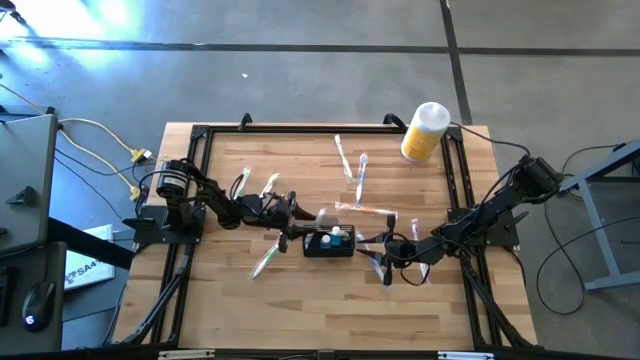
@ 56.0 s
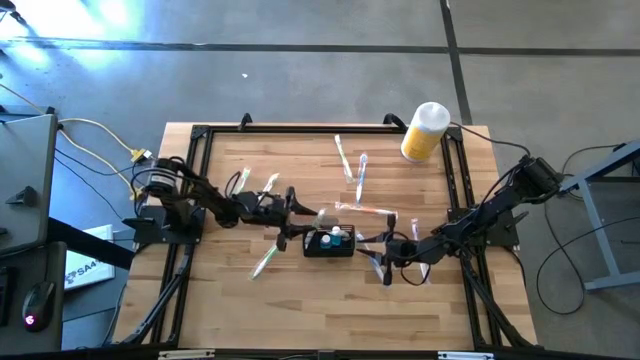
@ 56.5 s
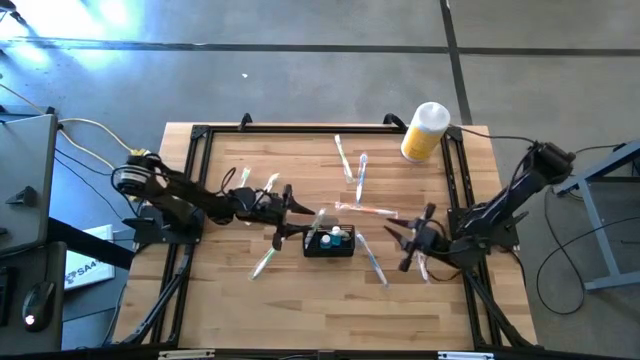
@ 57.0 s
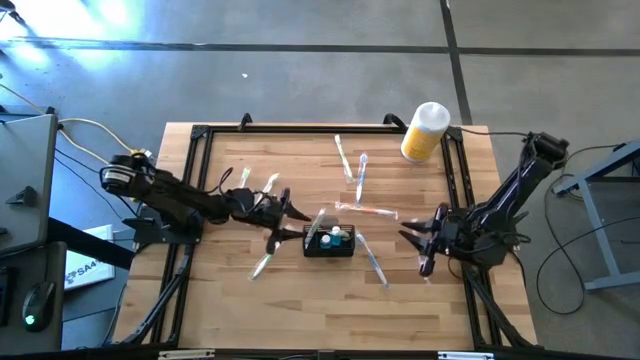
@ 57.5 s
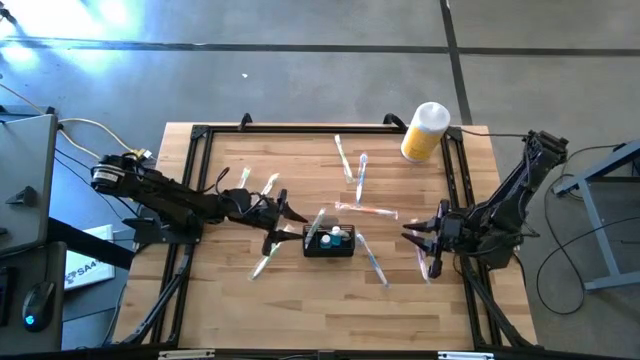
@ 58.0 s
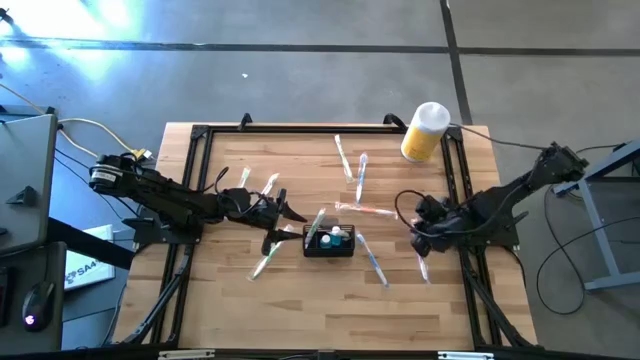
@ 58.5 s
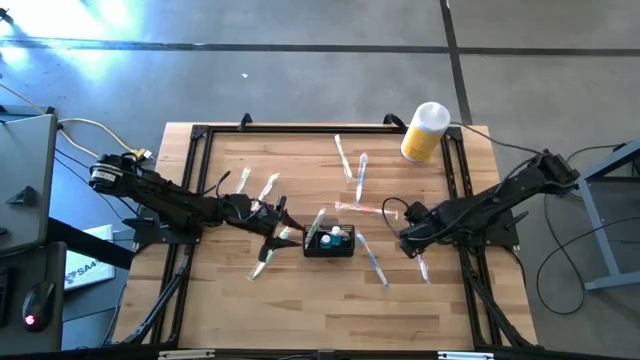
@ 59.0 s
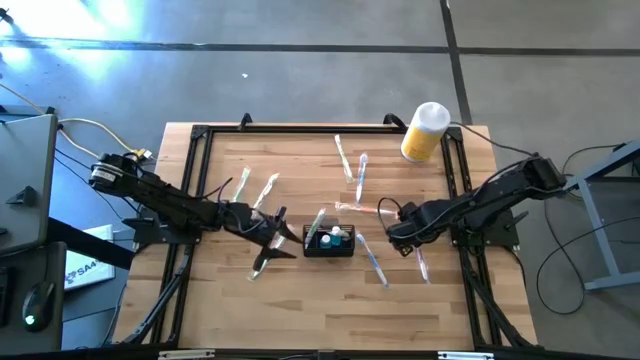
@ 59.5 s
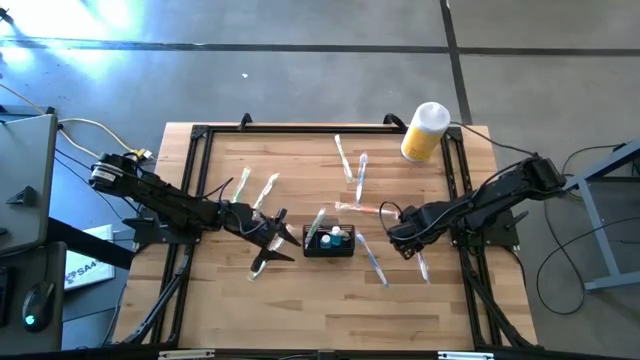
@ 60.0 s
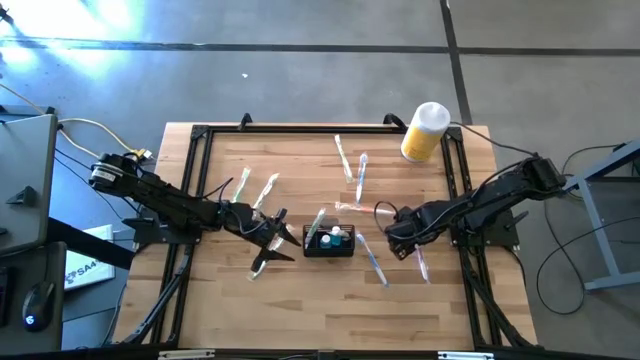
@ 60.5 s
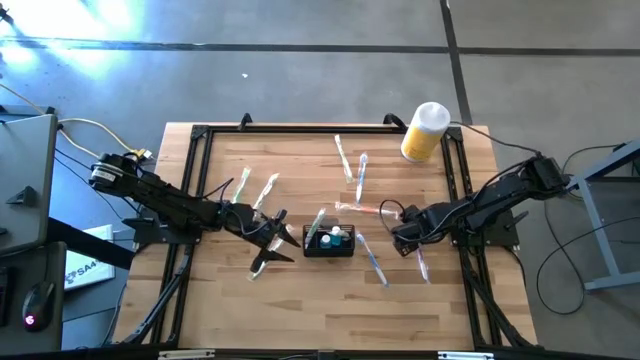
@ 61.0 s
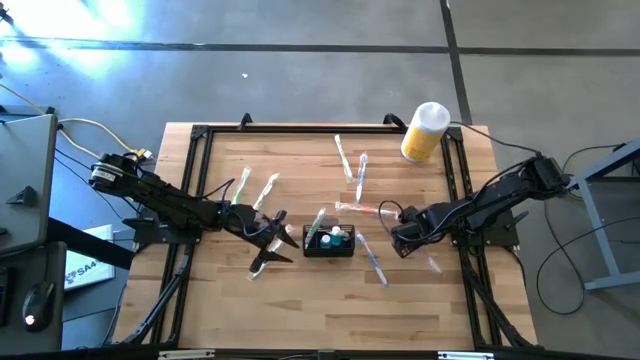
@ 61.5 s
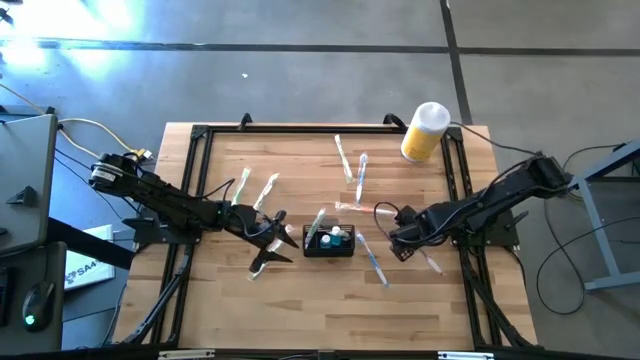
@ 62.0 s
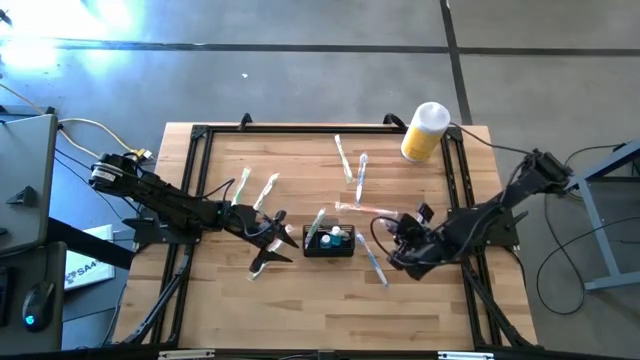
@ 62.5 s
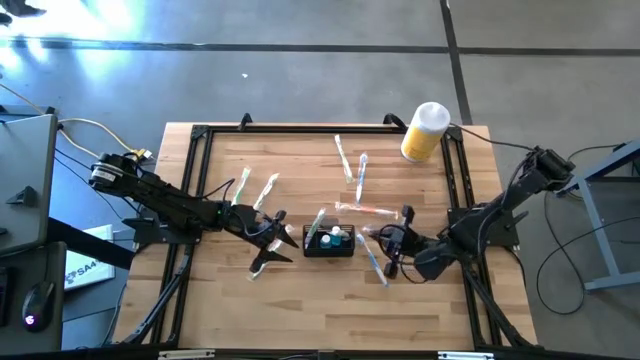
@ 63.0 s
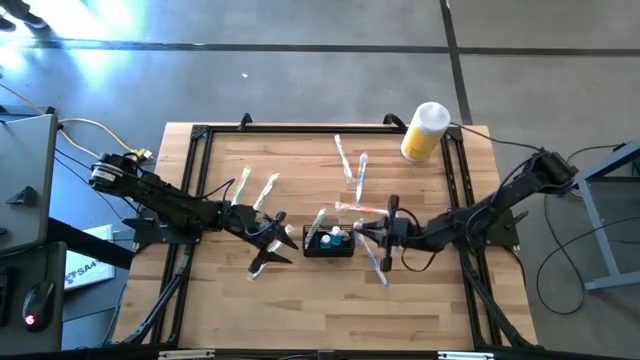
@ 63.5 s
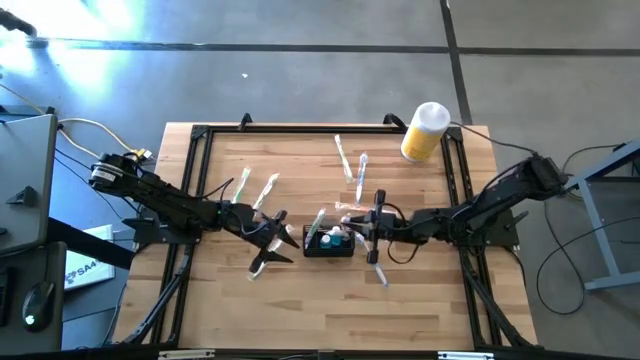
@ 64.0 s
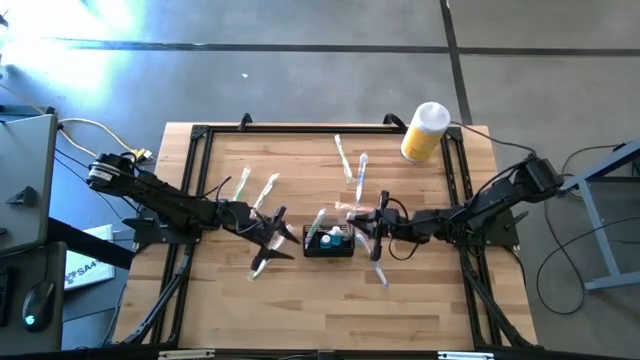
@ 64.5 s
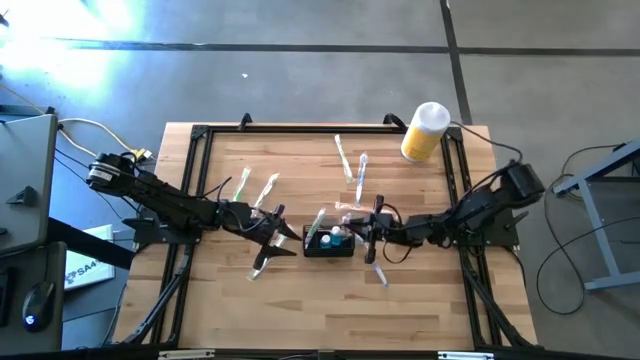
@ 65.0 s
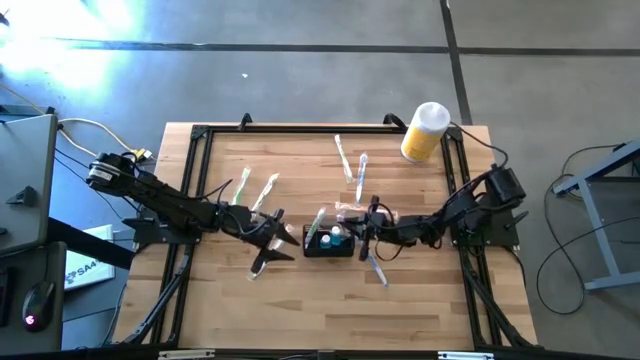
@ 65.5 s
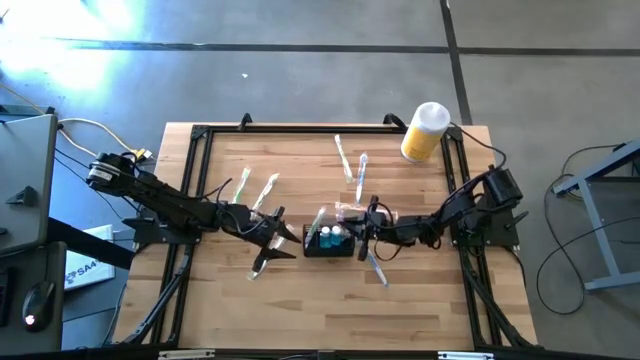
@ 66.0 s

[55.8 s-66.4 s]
Task: Pick & Place toothbrushing station
Put the purple toothbrush into the wire organizer

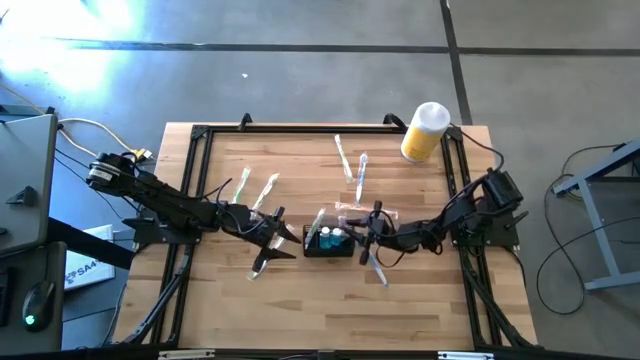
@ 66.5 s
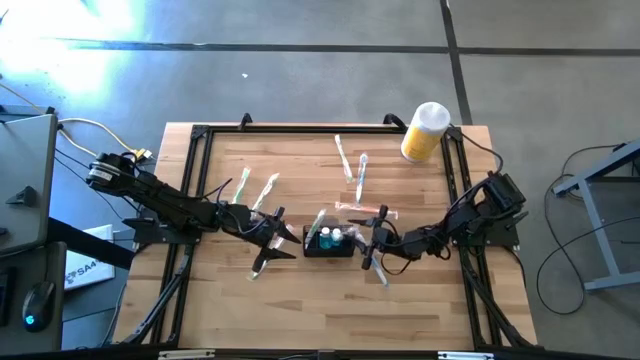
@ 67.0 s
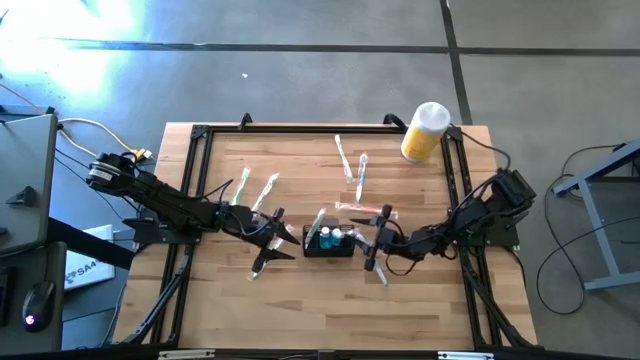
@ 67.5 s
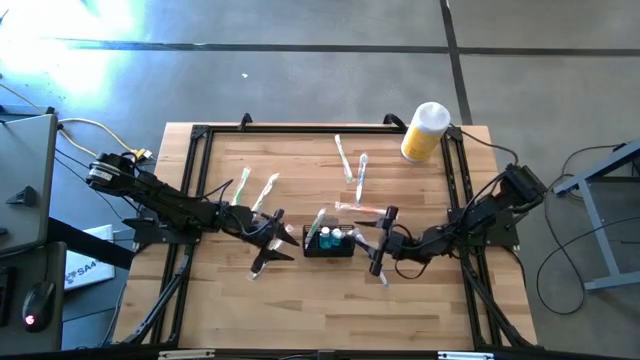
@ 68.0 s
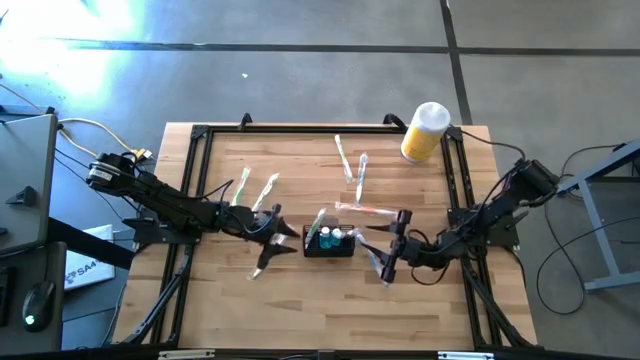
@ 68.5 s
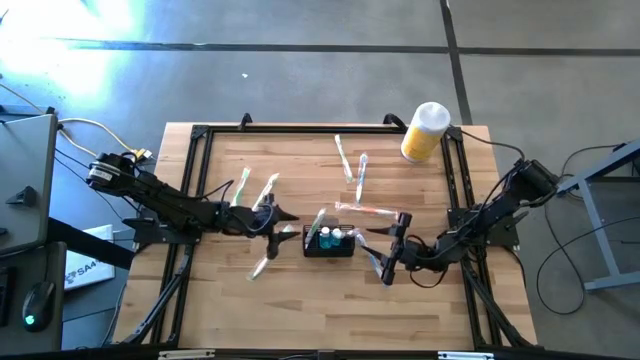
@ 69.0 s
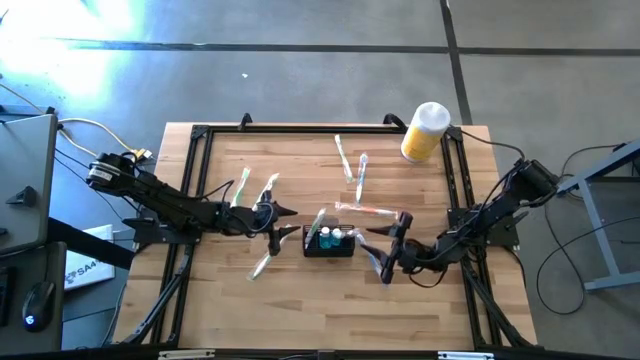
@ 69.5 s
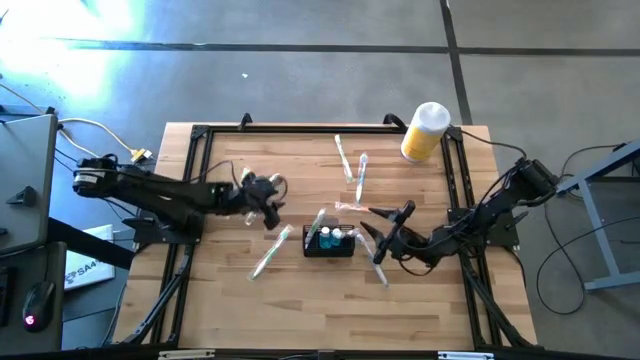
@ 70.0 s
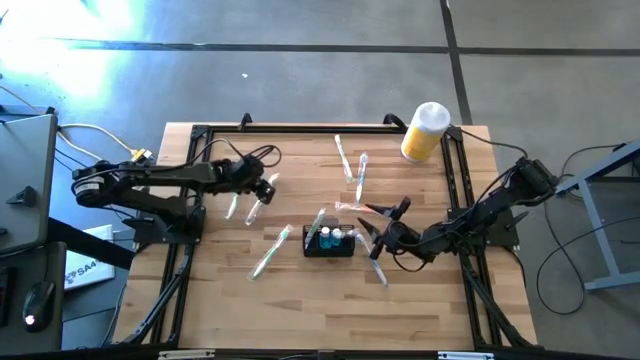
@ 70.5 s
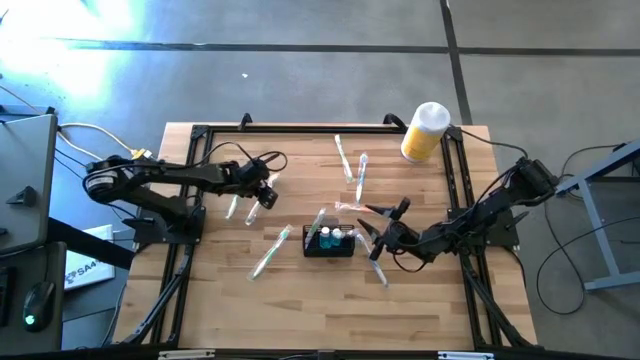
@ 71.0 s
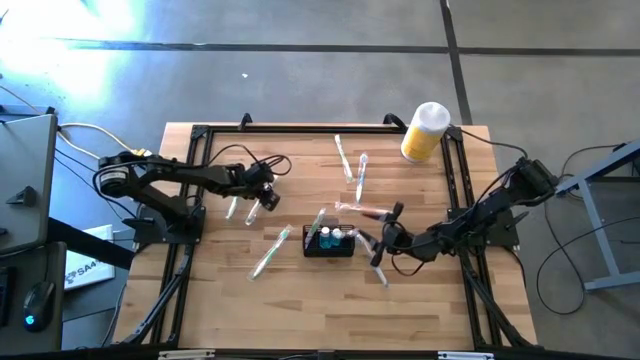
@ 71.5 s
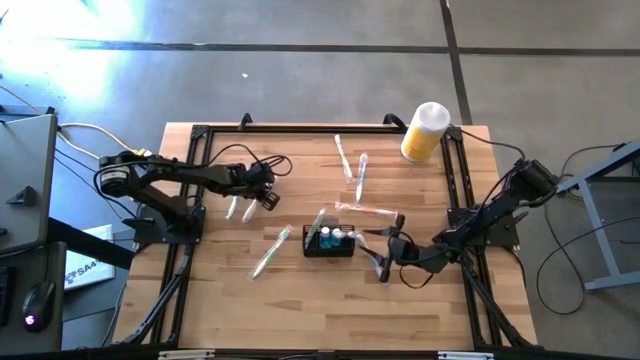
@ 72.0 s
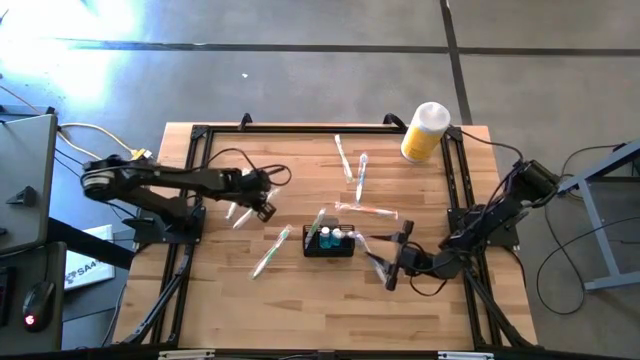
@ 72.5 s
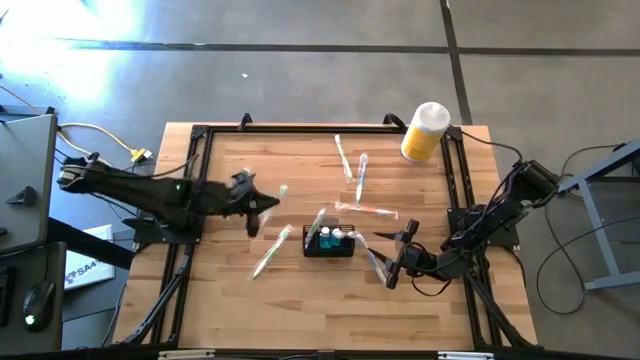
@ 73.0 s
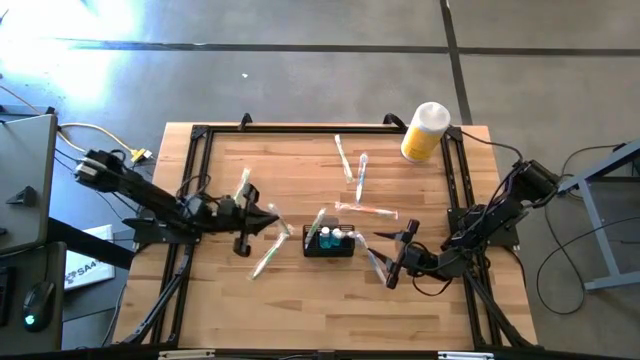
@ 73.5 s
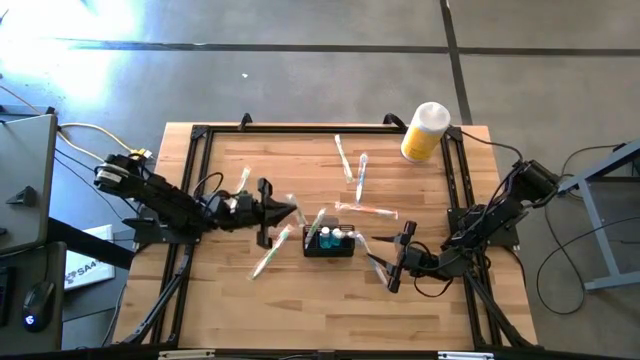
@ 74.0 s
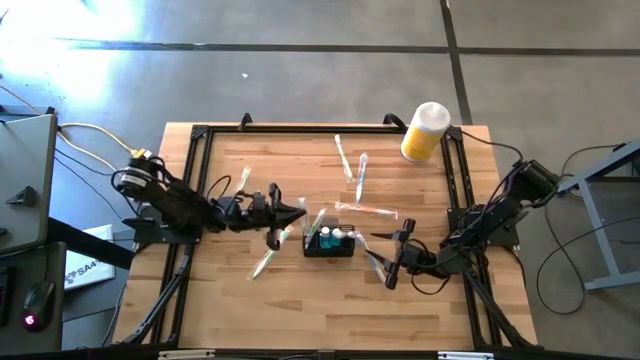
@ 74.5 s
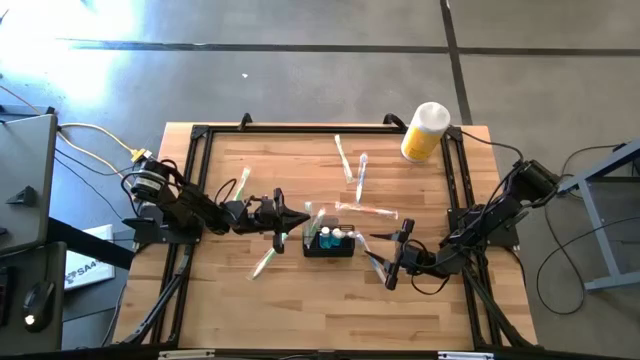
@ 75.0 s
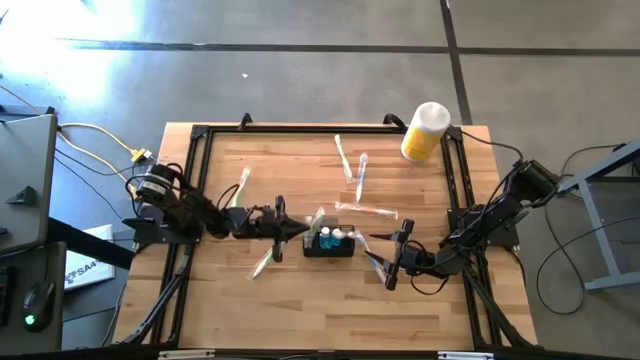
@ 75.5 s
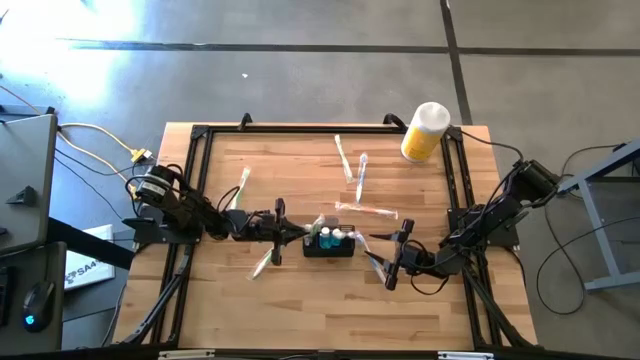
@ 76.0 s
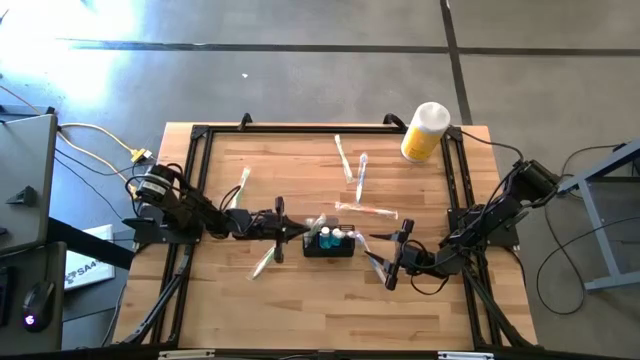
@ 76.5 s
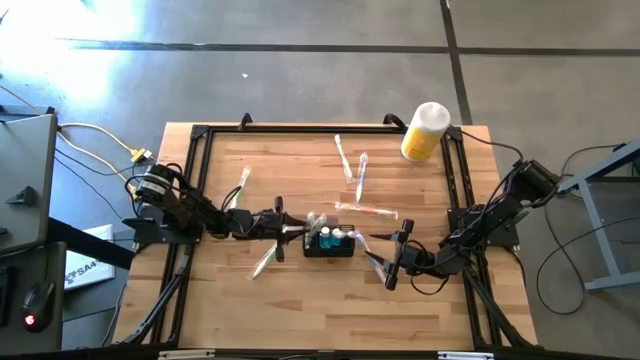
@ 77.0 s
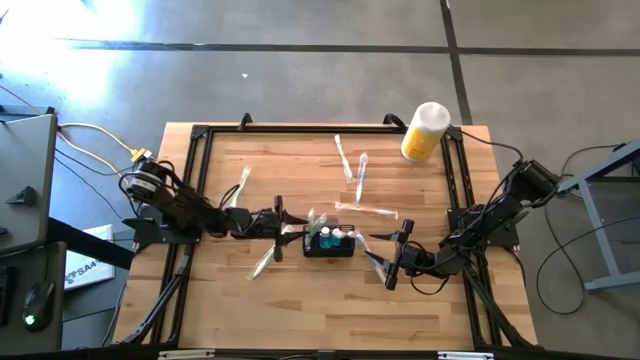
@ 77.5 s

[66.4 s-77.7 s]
Put the green toothbrush into the wire organizer
